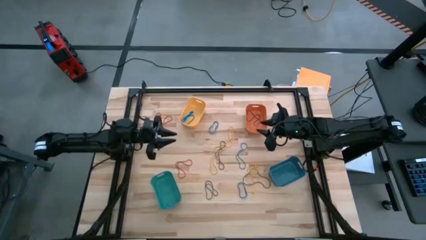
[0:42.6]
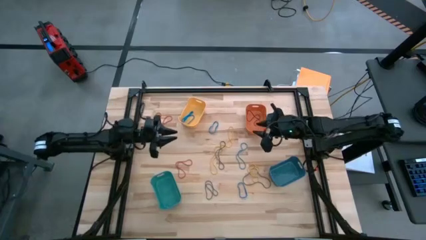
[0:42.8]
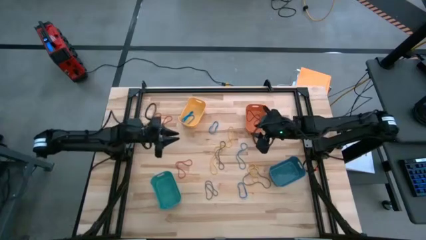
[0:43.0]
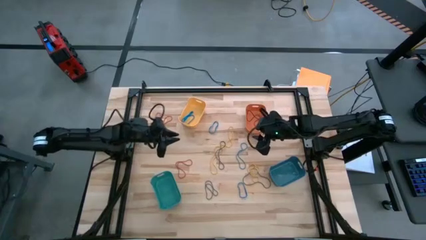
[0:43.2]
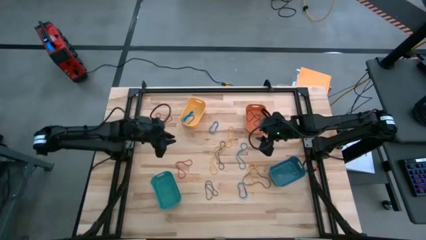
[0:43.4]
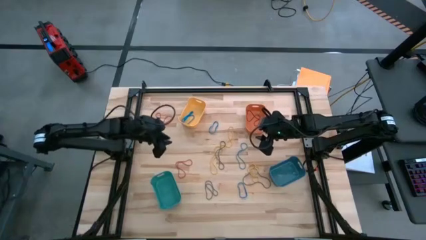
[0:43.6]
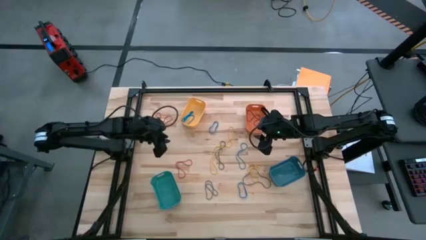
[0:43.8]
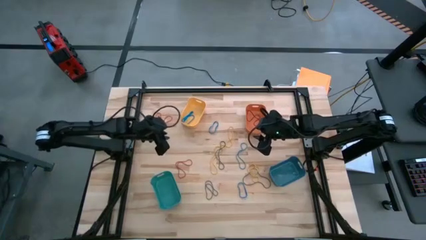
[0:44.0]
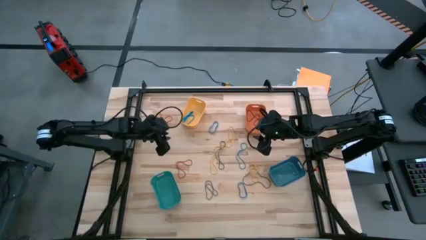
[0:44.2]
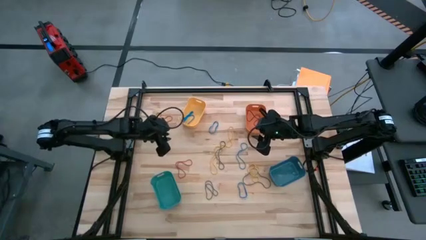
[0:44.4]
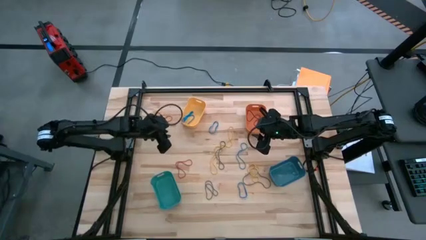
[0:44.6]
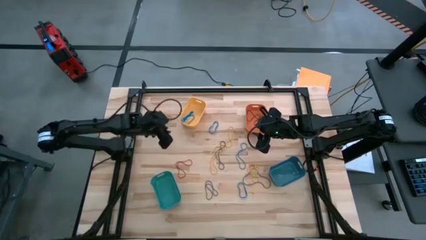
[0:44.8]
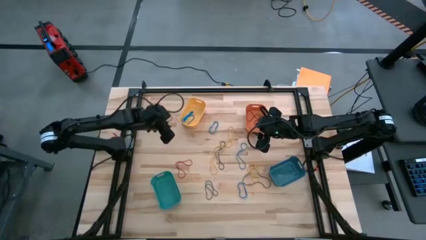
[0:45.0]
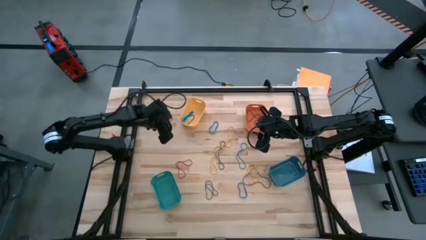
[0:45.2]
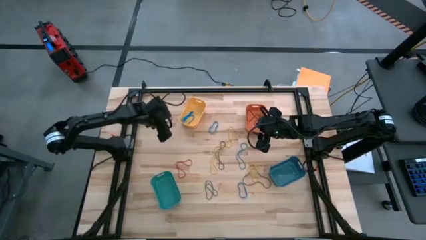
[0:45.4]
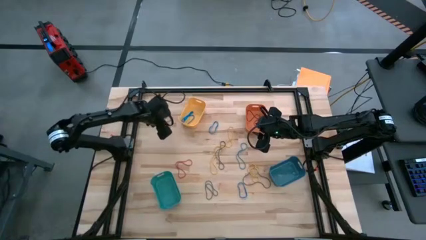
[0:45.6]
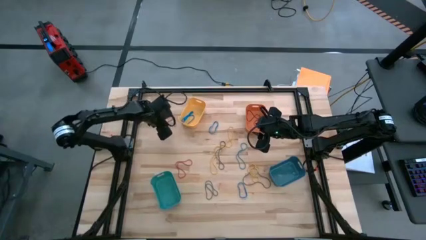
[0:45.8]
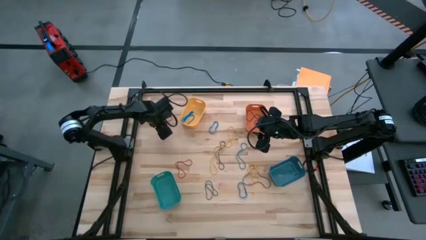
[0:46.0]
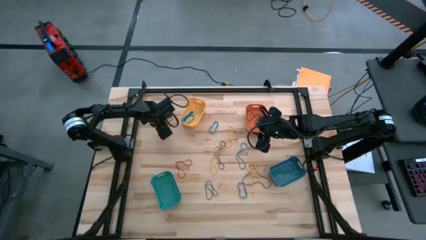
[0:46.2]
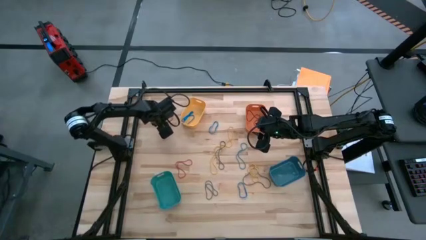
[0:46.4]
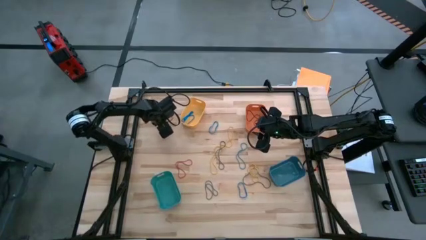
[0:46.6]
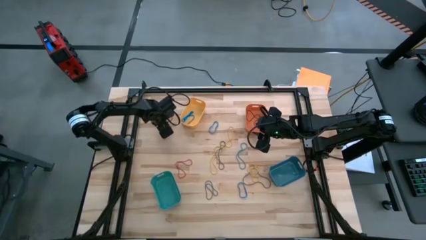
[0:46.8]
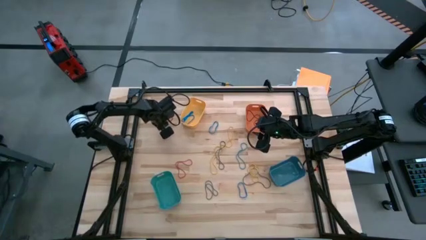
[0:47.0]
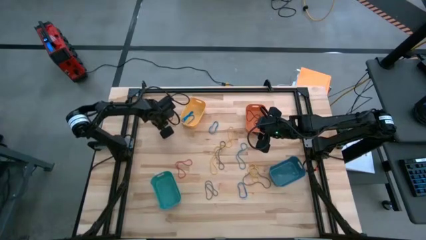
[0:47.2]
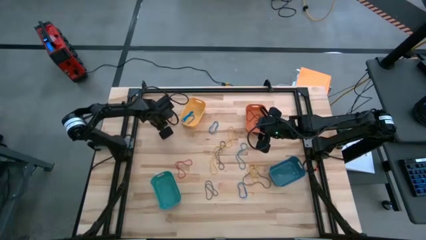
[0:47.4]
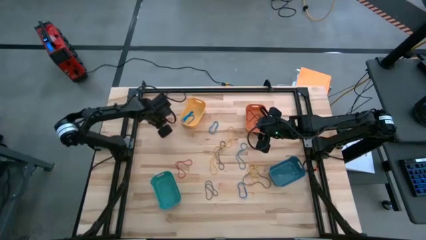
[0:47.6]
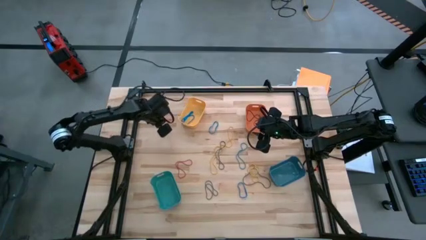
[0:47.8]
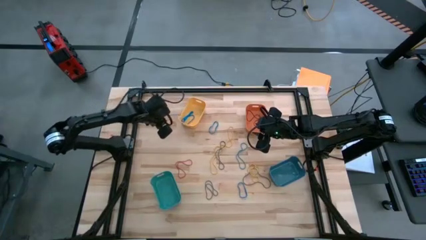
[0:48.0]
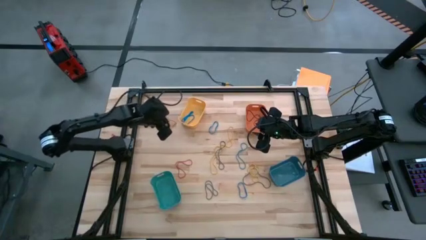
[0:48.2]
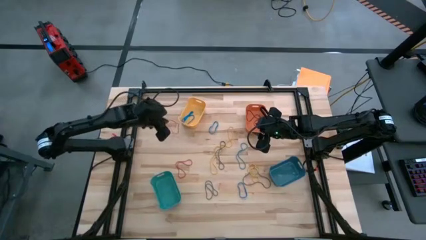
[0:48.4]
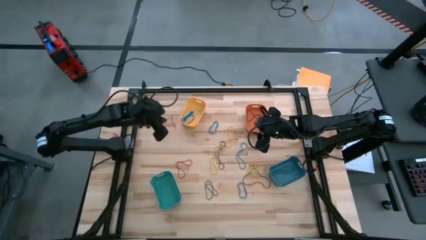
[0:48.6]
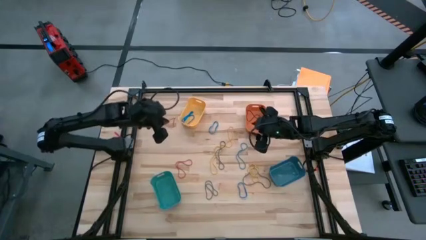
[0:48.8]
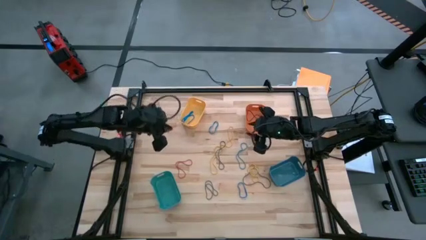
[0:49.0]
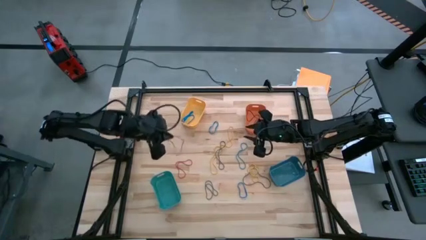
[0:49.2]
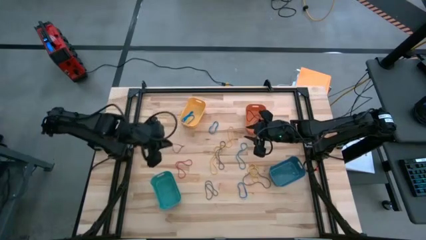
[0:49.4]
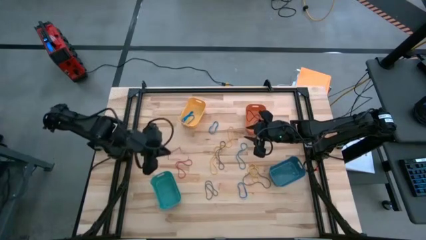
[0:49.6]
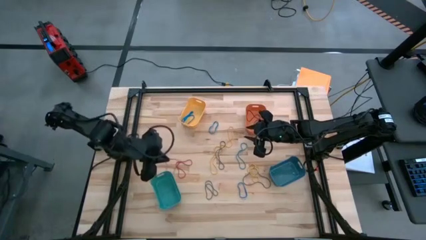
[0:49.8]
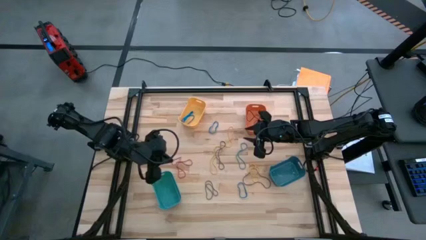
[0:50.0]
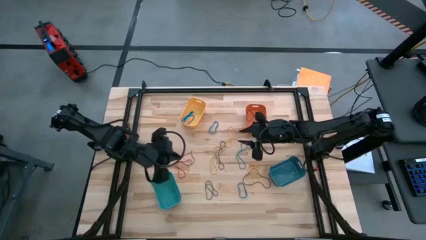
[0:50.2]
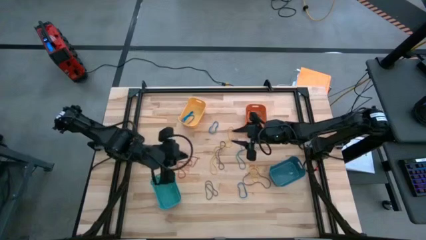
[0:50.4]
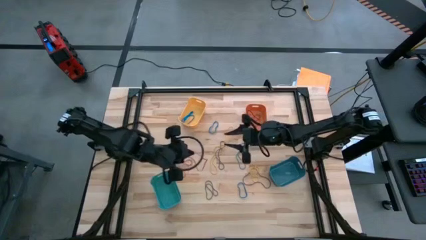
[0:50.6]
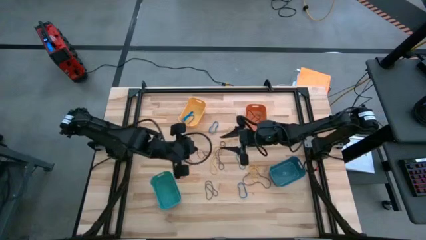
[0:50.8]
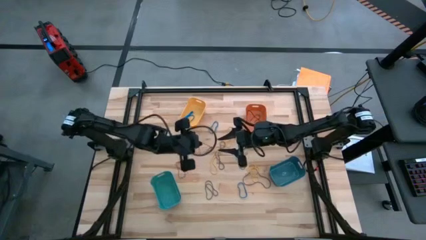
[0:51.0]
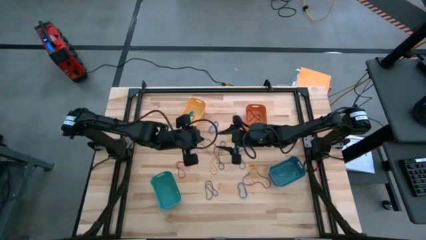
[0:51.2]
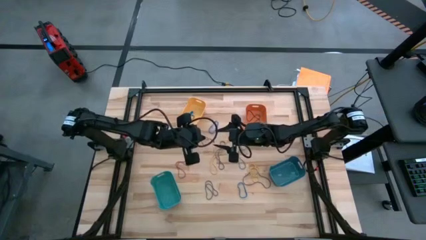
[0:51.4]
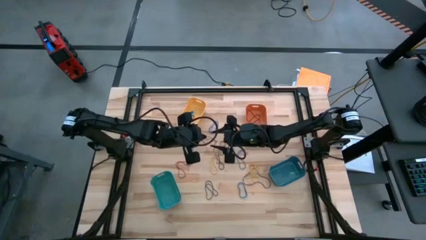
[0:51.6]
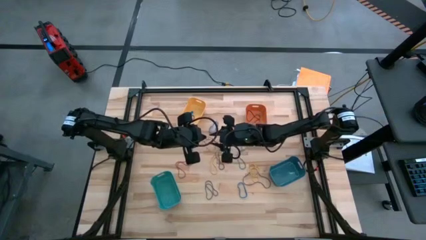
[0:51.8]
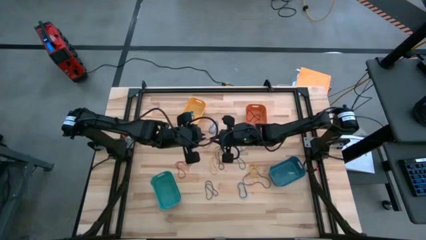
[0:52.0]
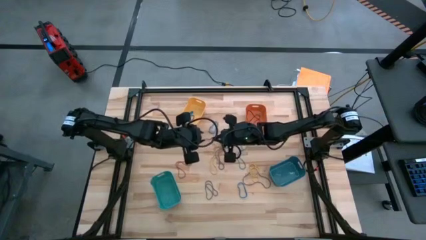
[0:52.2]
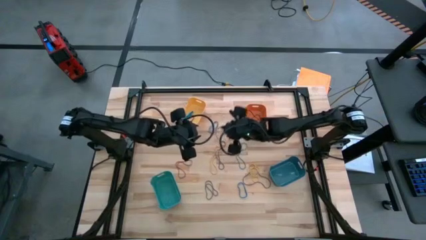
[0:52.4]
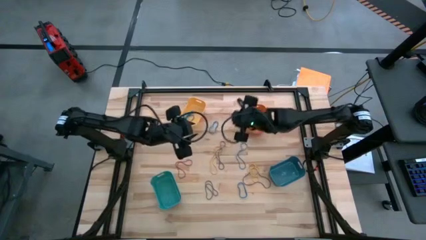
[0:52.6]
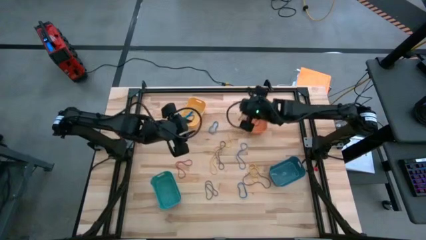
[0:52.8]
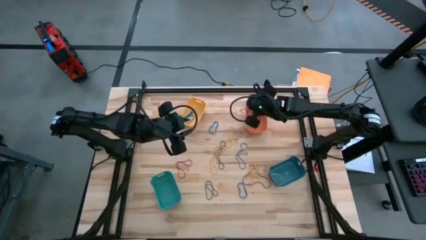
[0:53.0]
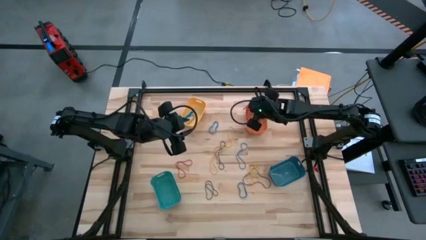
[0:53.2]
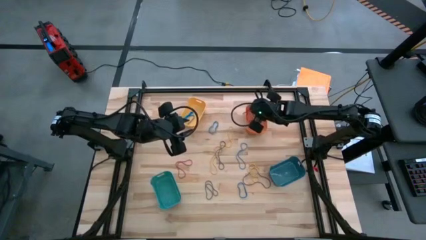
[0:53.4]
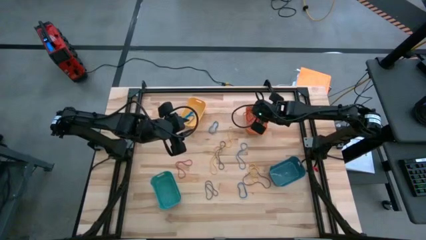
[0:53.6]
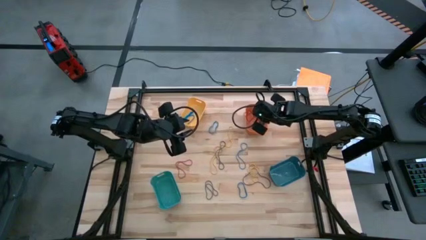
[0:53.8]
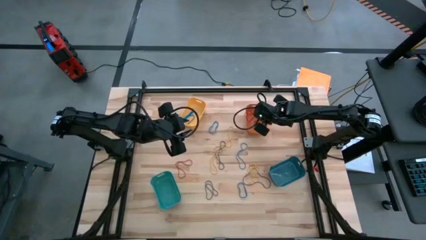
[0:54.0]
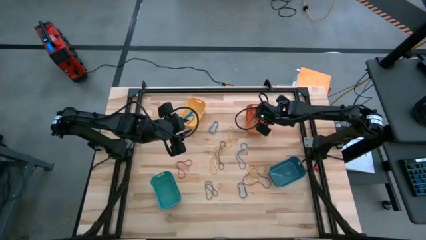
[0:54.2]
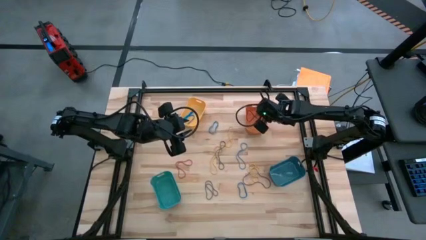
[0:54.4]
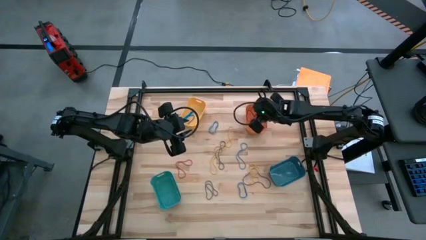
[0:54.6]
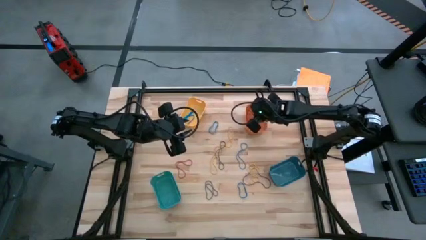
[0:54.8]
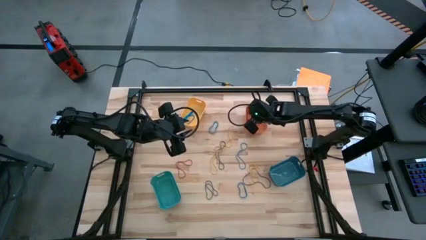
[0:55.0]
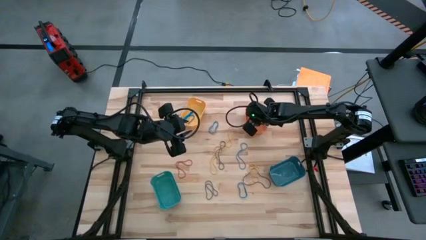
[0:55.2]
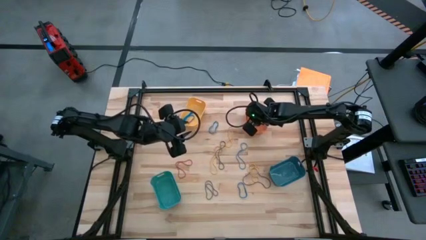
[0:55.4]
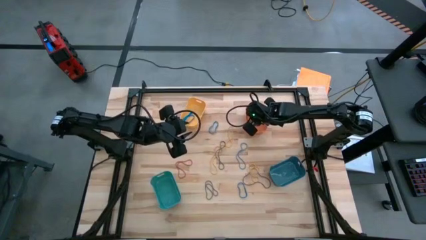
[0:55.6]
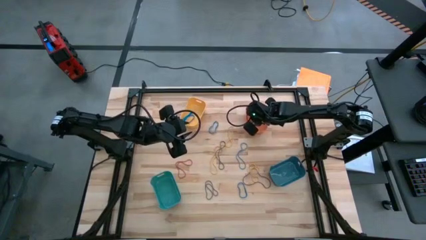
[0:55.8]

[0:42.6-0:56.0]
Task: Sort rubber bands into baskets
Put the red rubber band into the orange bin
